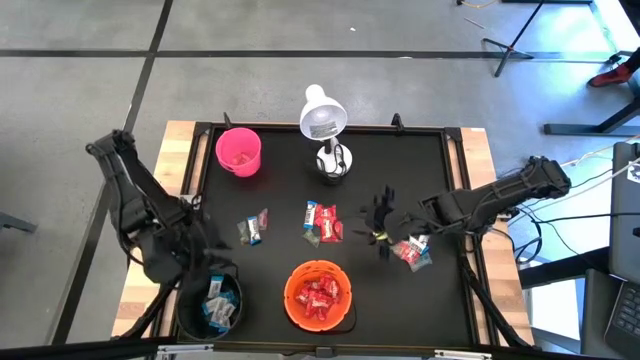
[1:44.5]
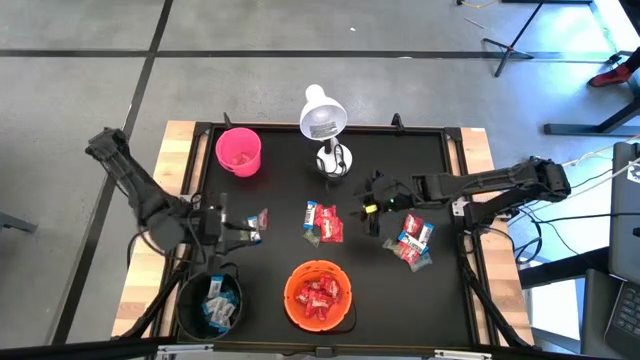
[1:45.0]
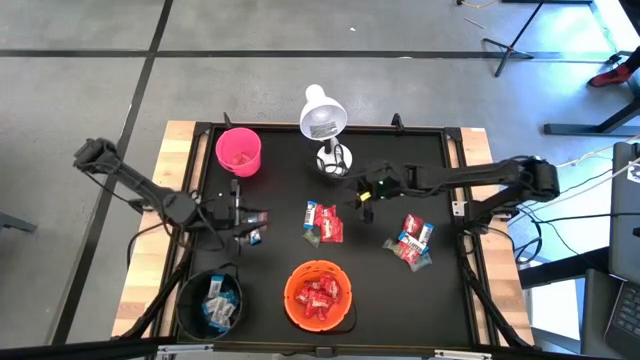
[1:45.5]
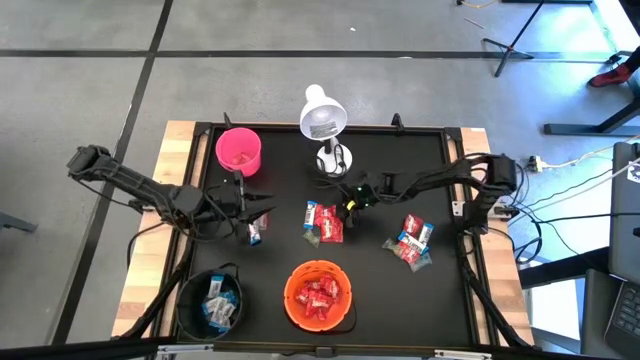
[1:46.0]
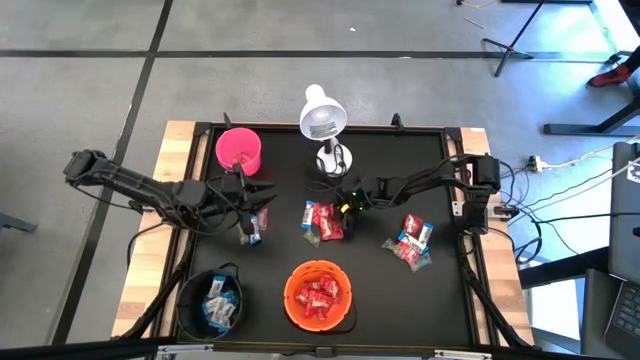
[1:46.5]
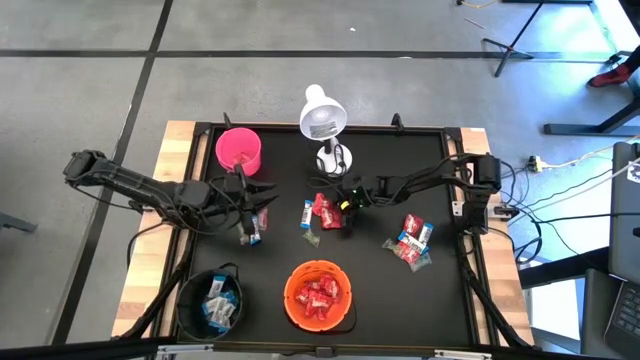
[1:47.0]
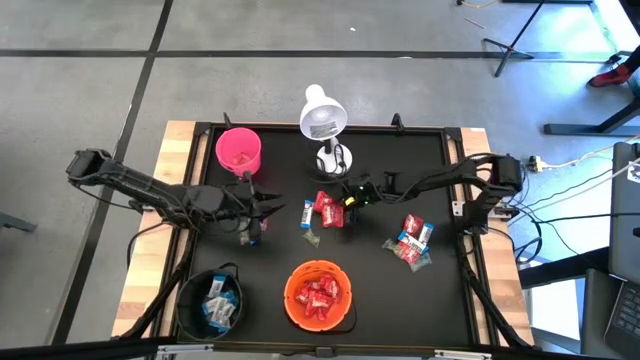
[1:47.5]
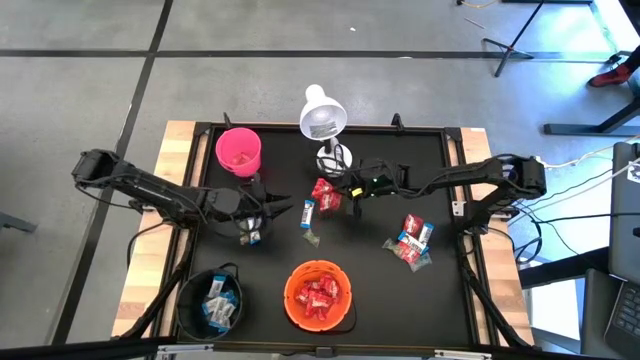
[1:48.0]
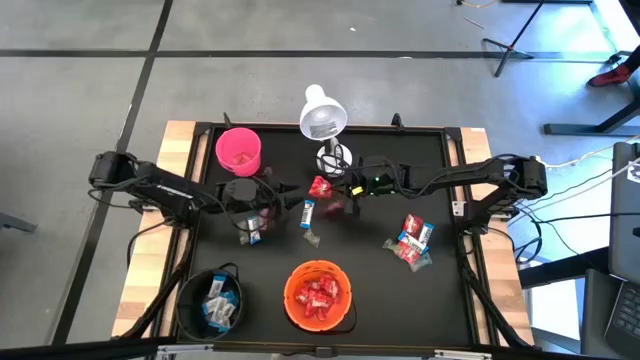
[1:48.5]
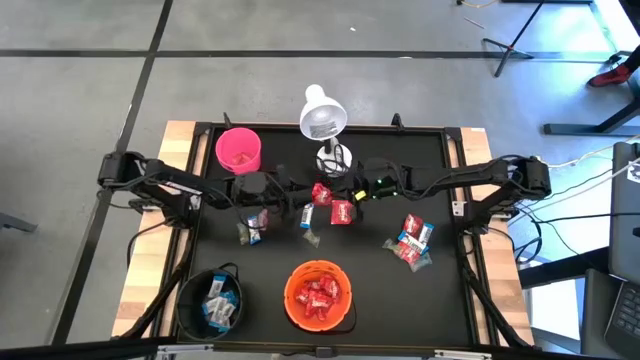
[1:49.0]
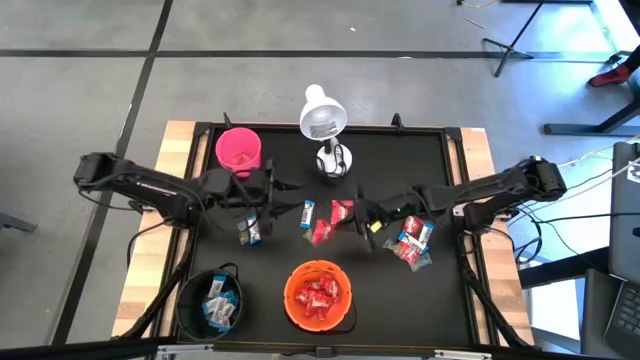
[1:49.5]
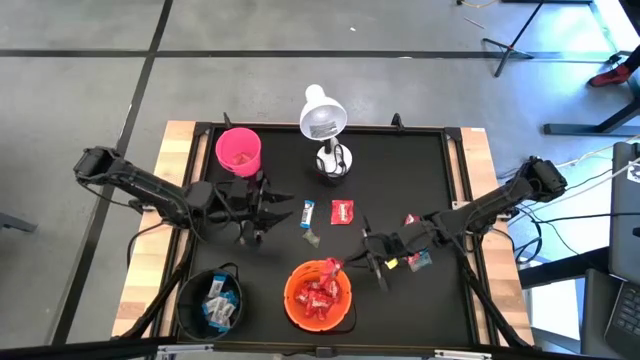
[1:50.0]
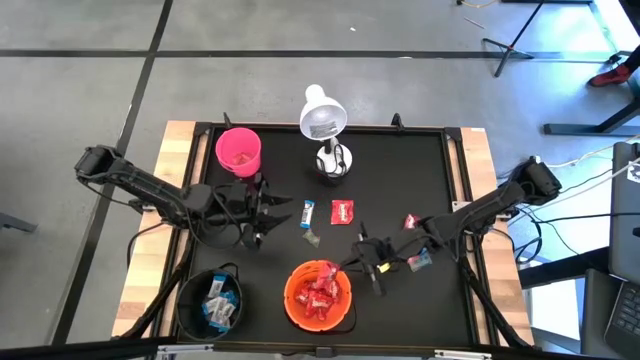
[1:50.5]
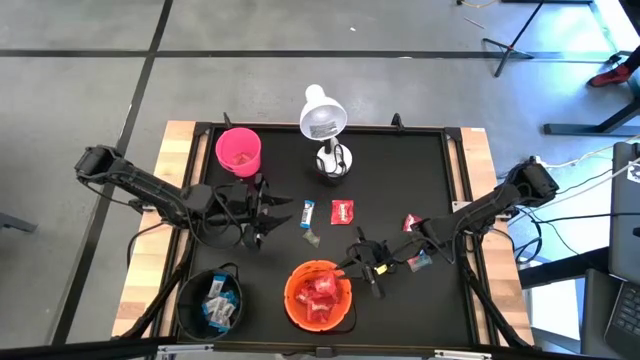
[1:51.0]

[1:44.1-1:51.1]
Task: Sort candy
Put the red candy into the orange bucket

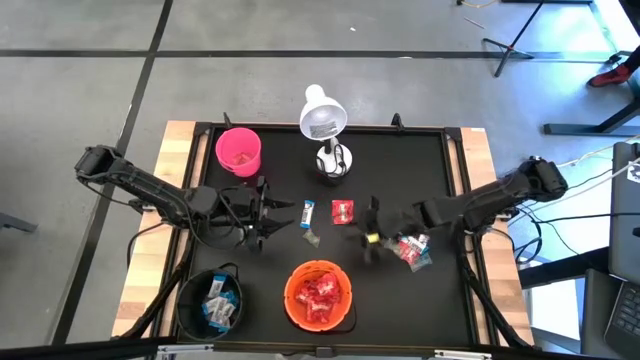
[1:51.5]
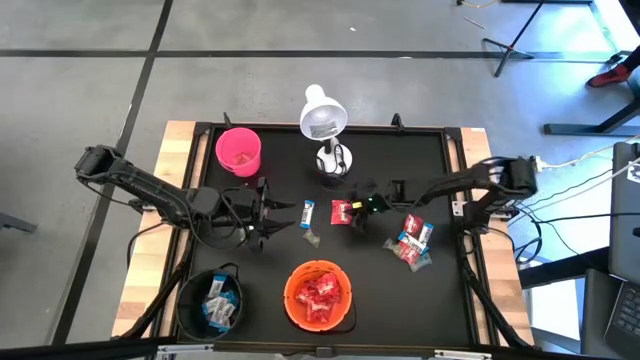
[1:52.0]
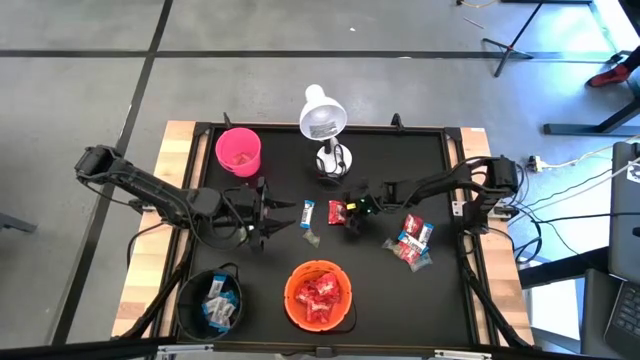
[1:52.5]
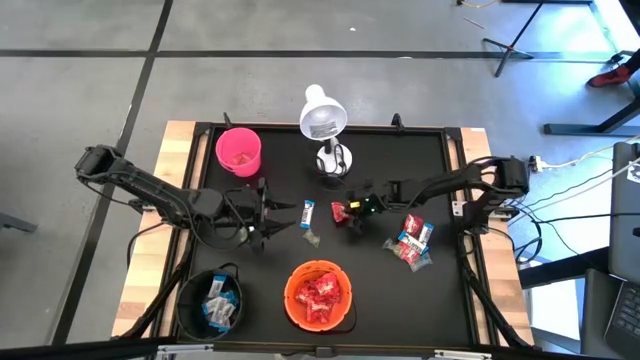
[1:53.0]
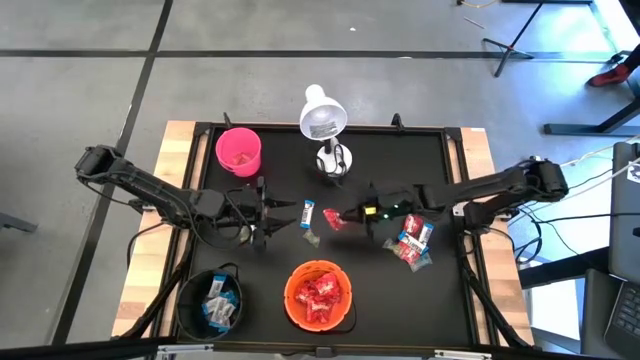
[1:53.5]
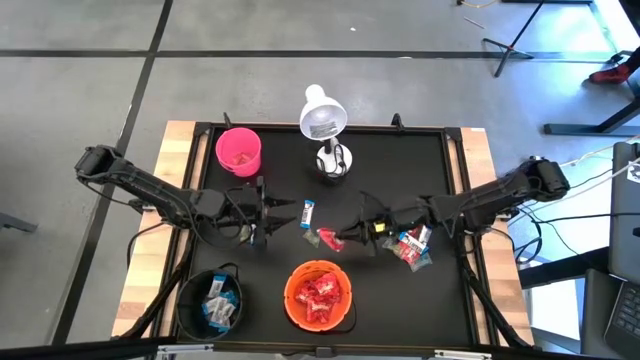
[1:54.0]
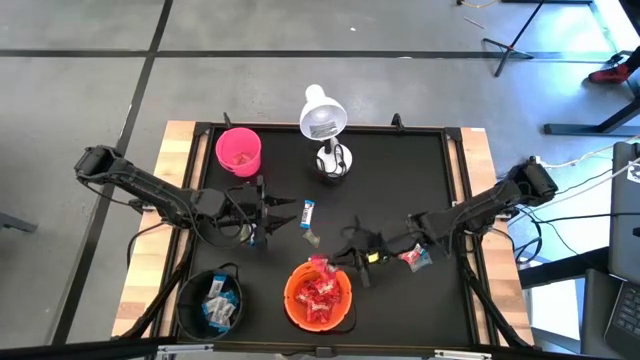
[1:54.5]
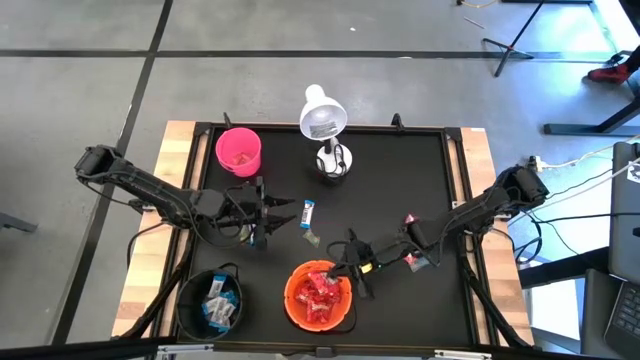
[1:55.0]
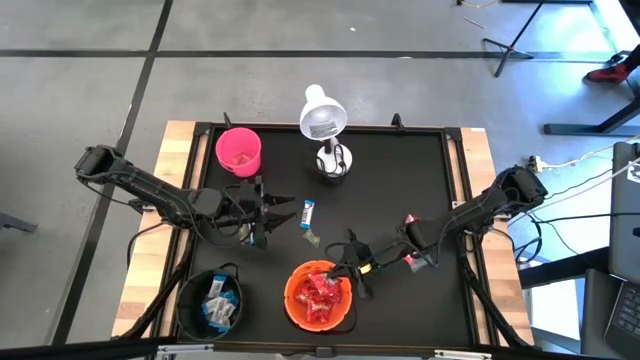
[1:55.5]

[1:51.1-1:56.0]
Put the red candy into the orange bucket

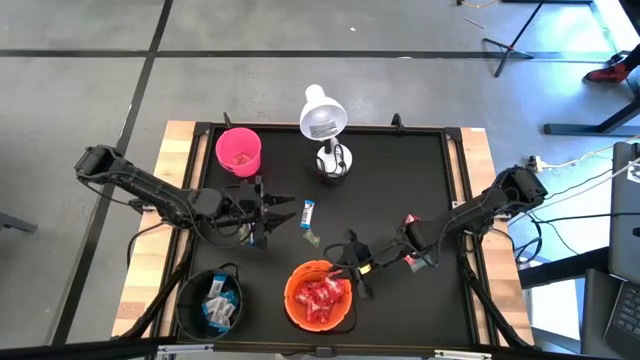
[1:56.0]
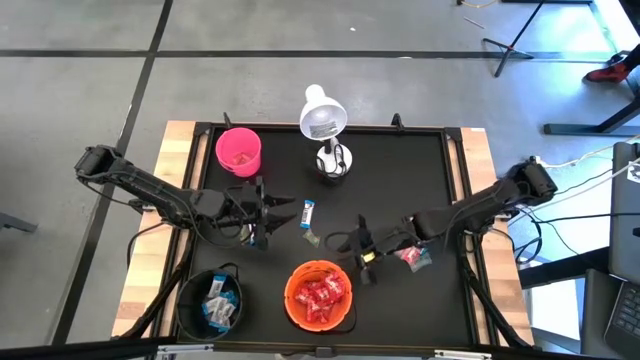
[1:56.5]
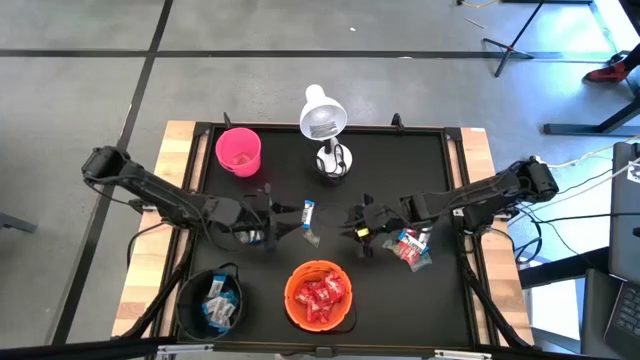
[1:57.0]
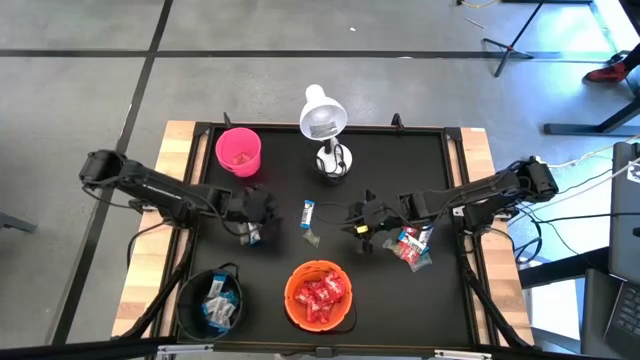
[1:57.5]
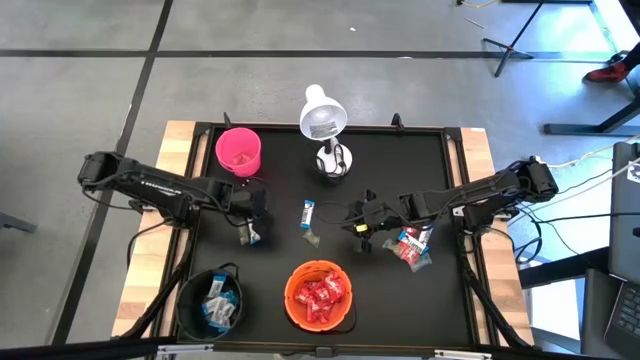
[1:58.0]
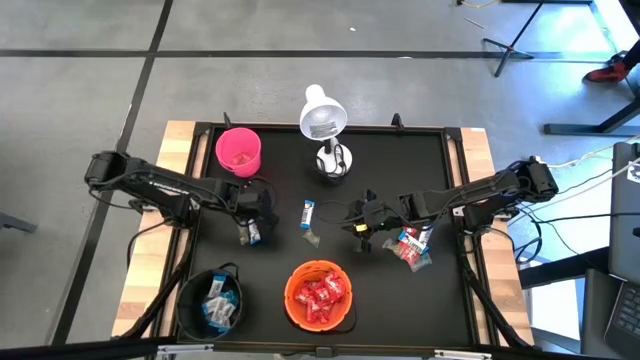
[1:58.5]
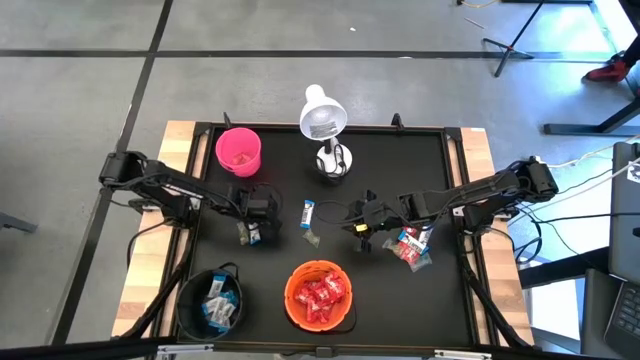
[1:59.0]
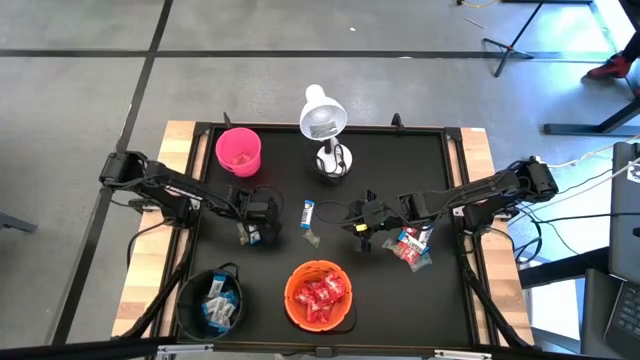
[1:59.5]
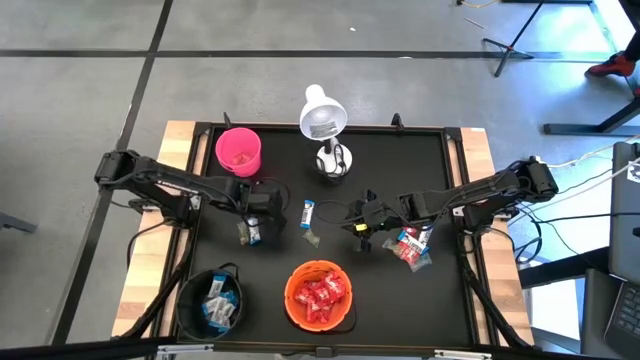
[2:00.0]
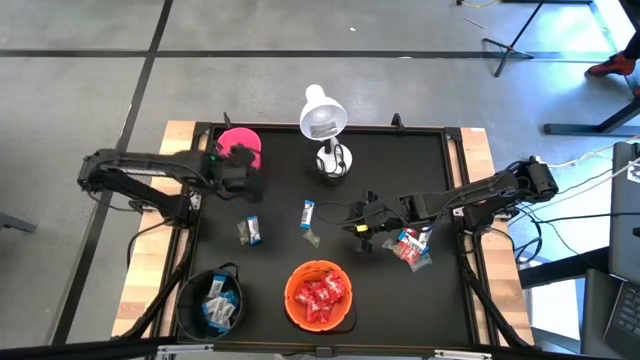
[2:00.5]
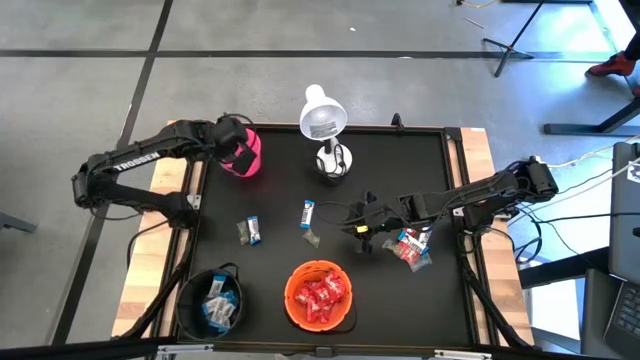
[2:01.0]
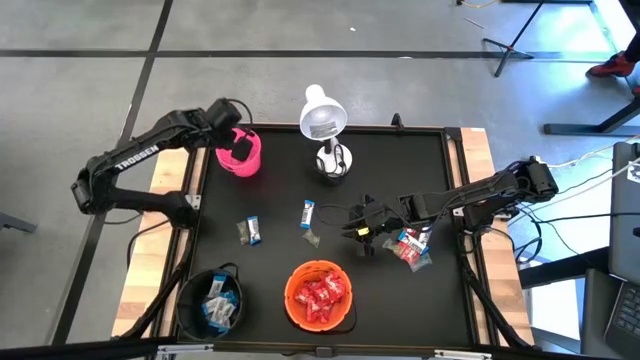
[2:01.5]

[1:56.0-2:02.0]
Put the orange candy into the pink bucket

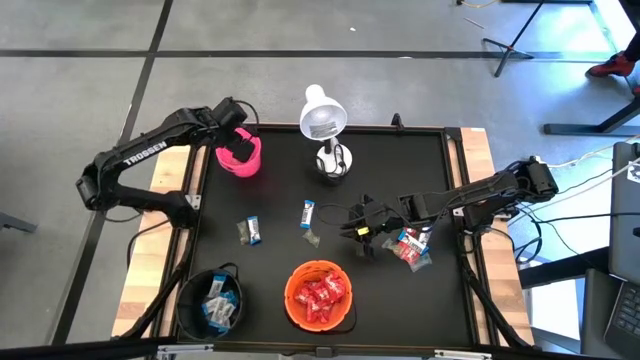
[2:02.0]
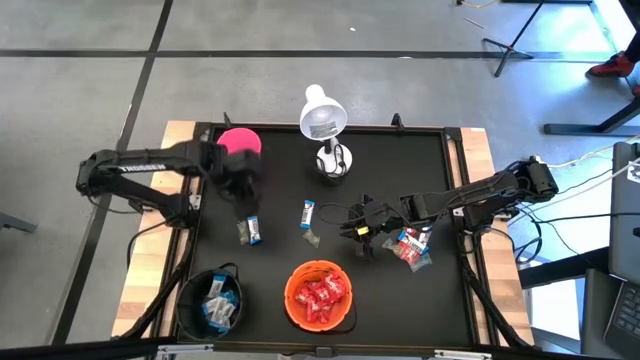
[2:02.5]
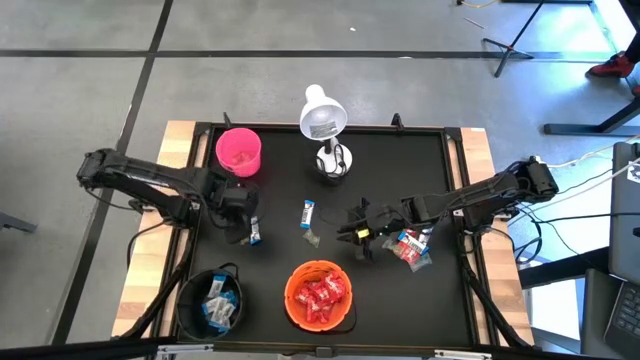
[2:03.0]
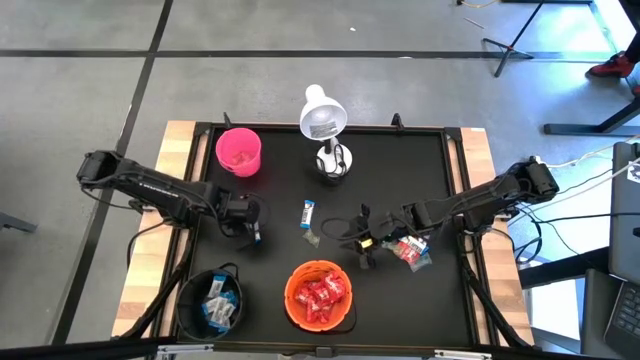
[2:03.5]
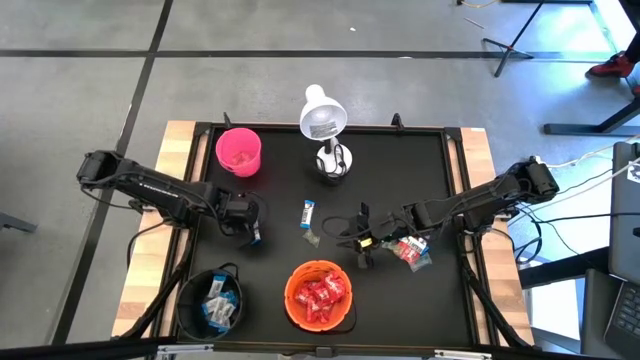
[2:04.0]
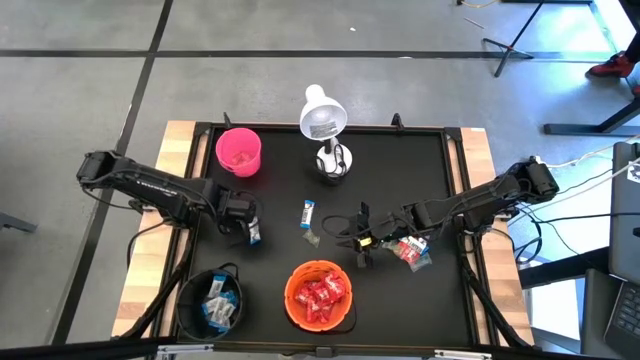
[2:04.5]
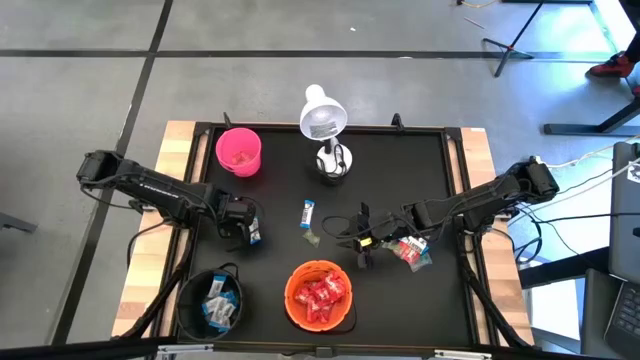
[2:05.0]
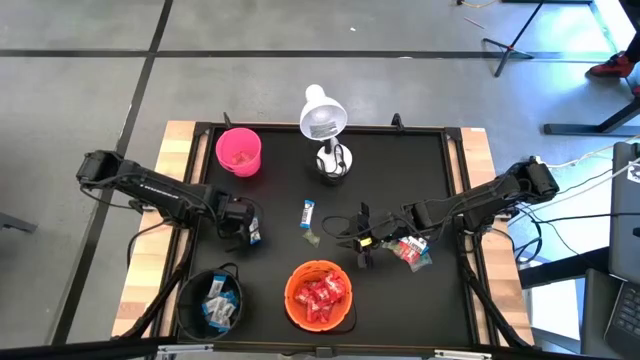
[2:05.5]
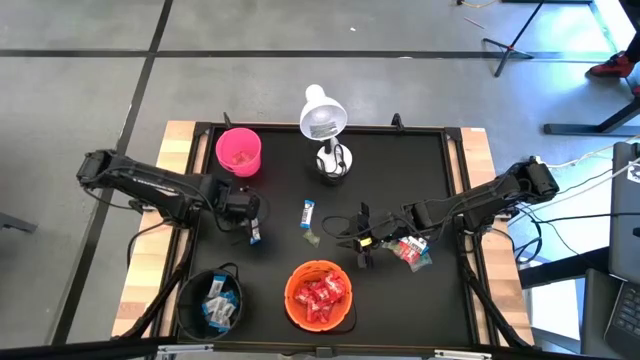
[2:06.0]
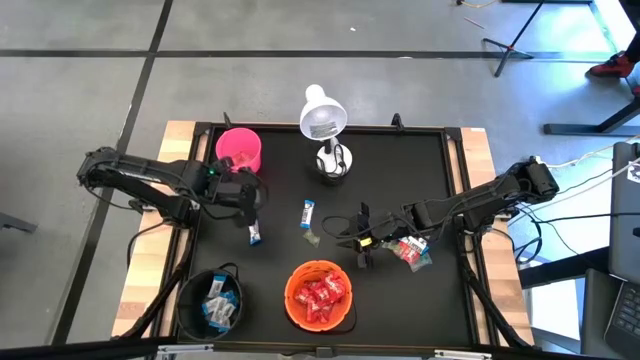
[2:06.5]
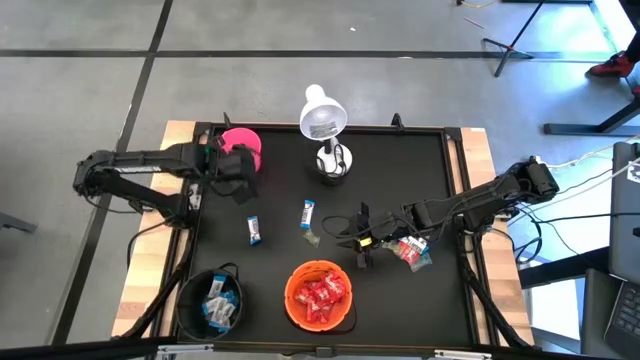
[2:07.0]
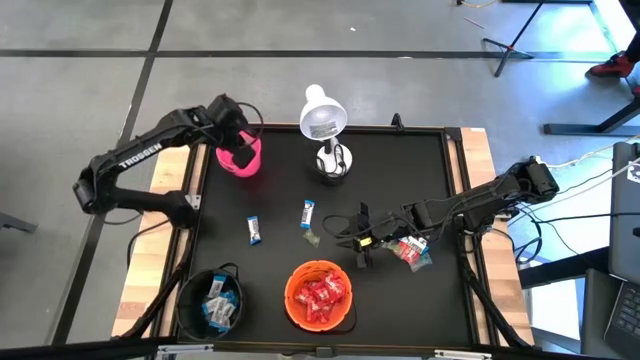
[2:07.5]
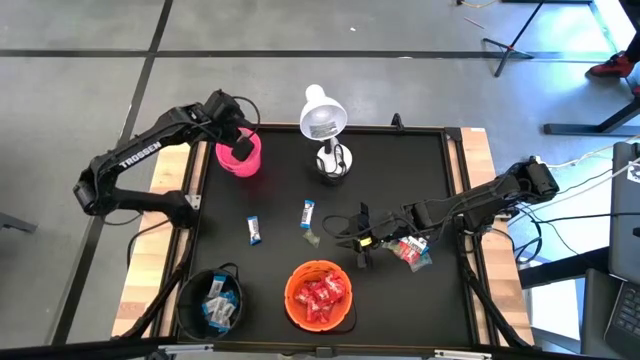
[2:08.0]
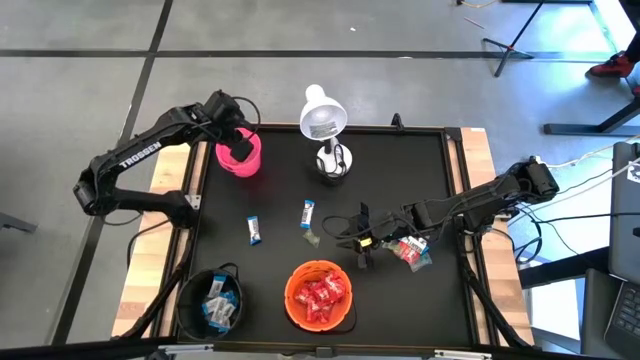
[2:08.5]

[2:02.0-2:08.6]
Put the green candy into the pink bucket
